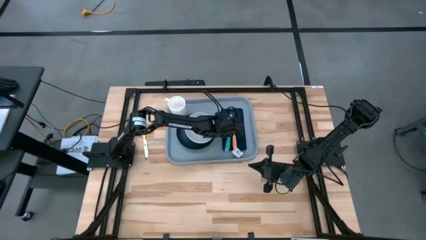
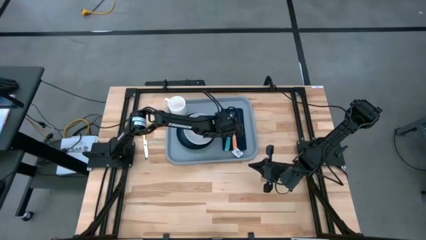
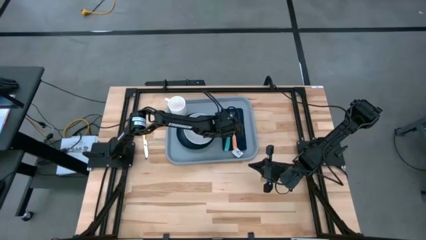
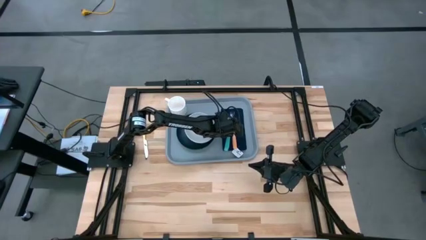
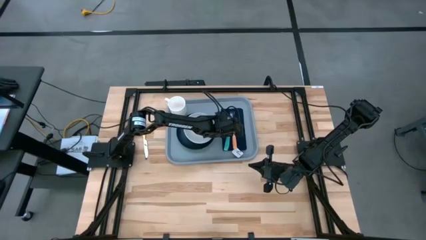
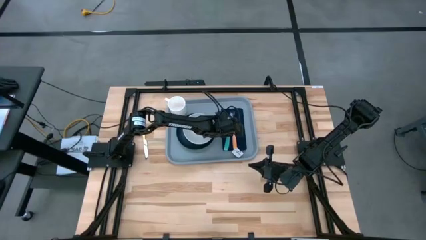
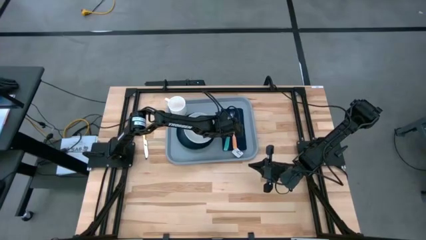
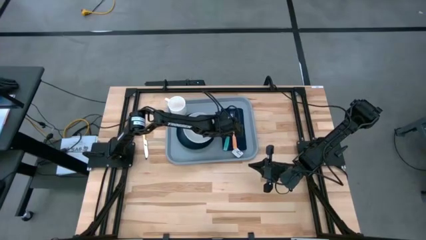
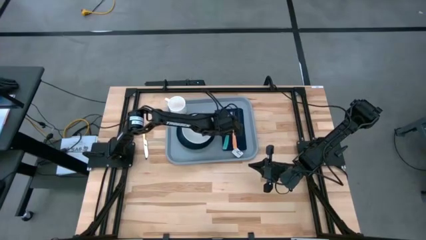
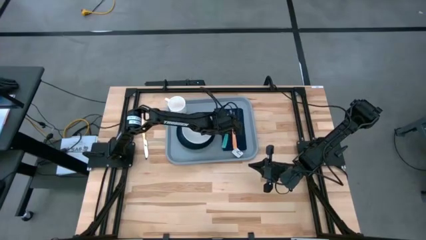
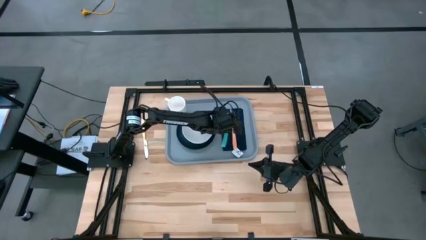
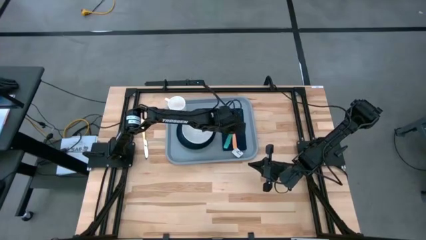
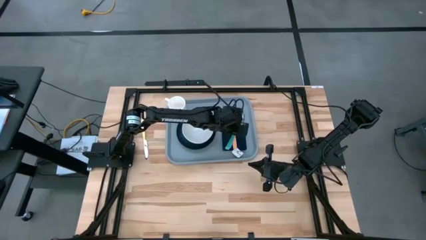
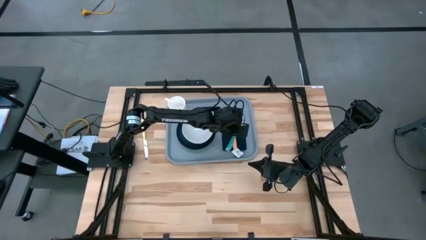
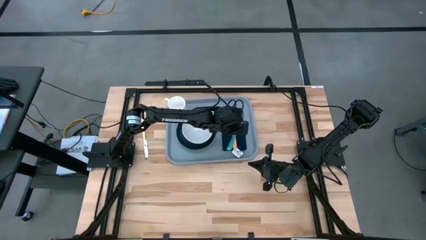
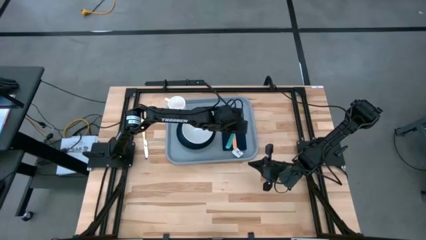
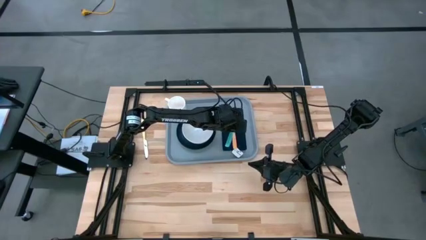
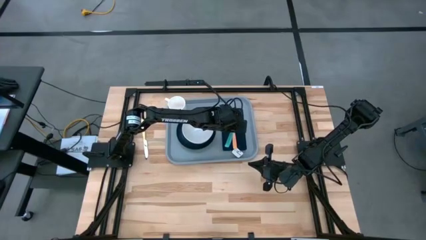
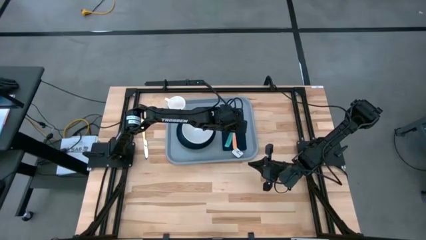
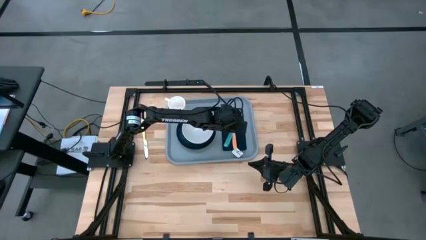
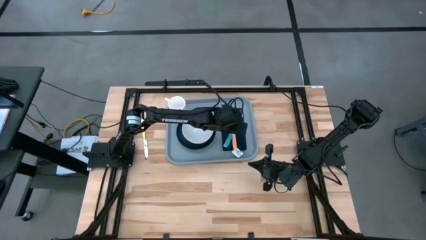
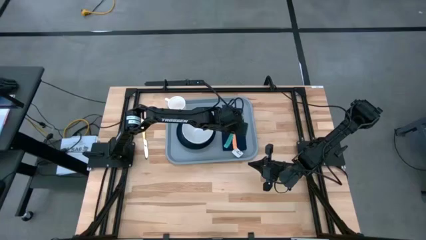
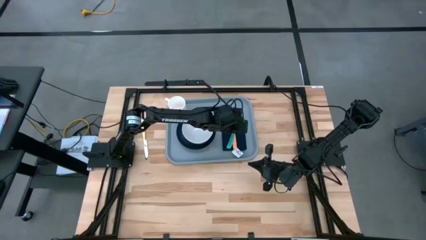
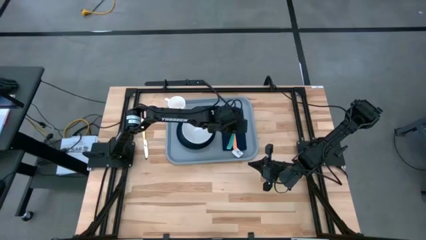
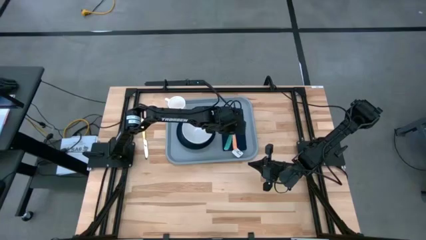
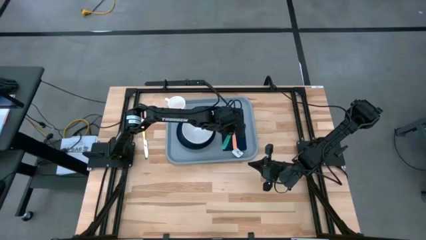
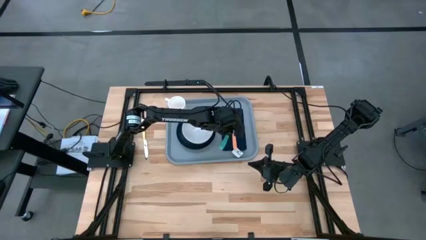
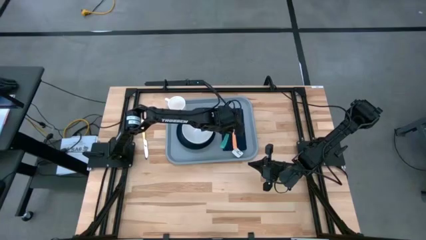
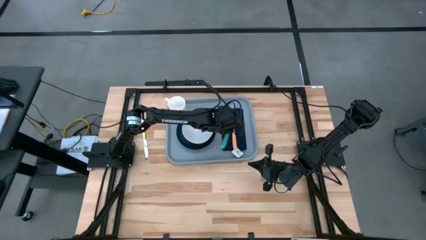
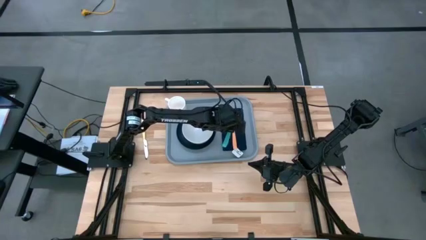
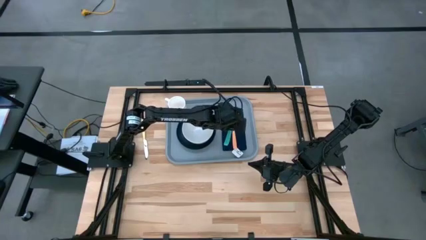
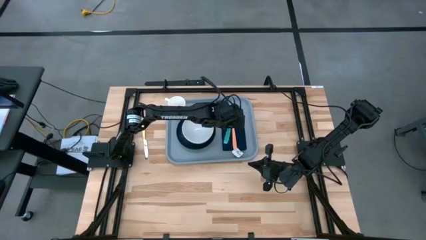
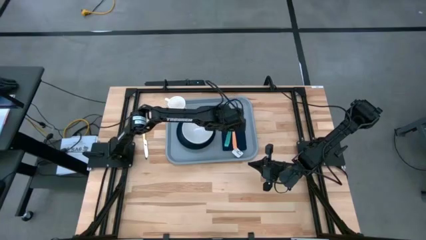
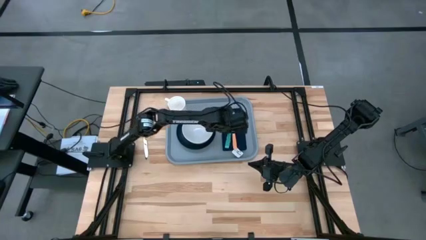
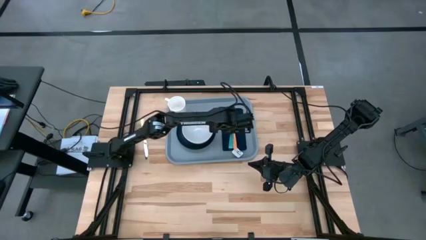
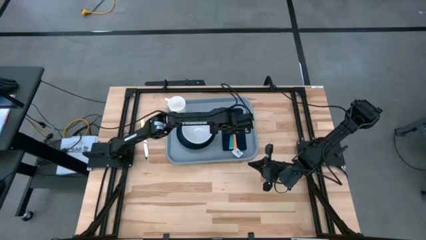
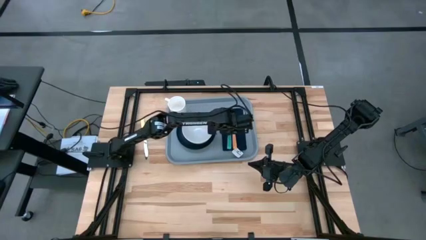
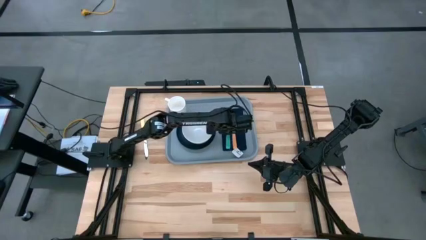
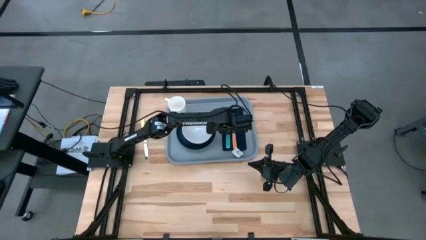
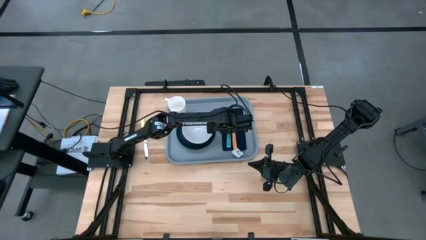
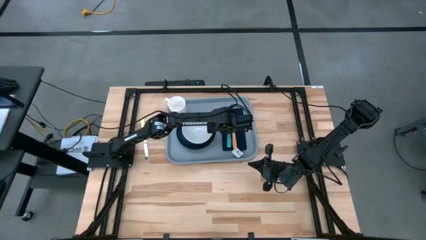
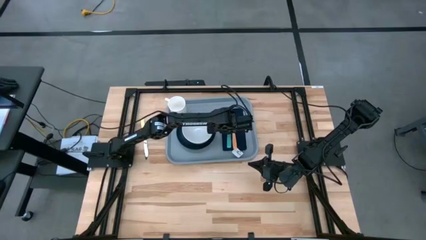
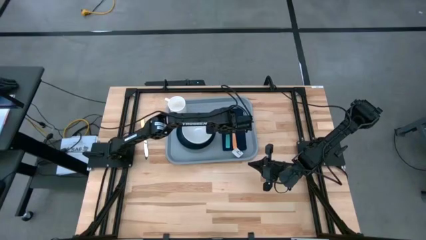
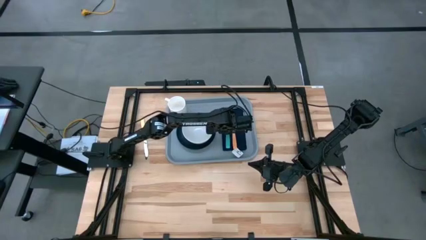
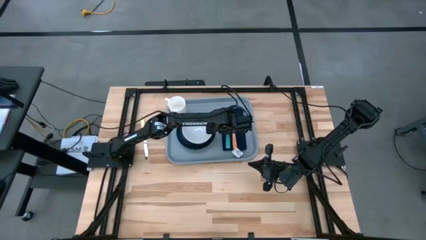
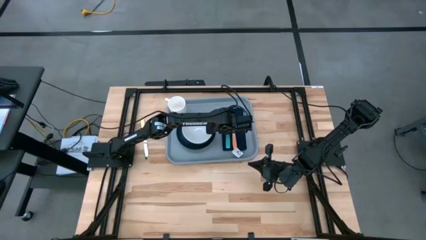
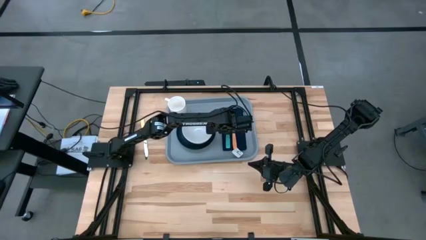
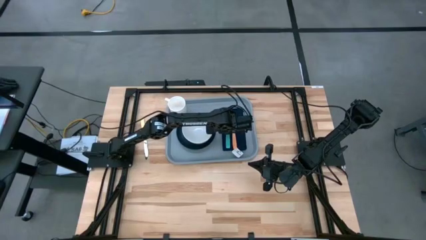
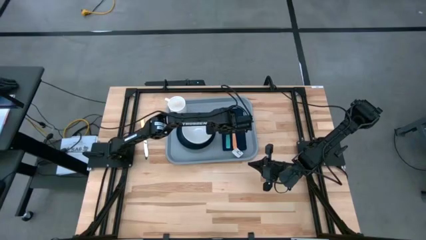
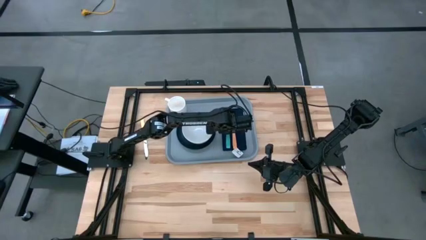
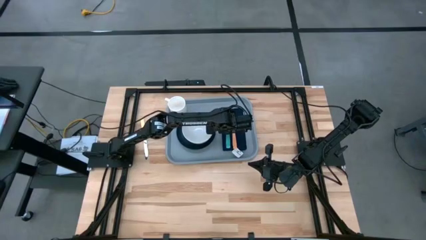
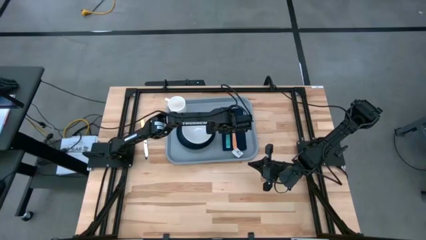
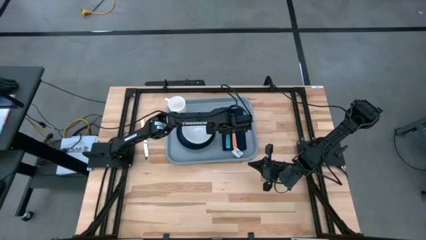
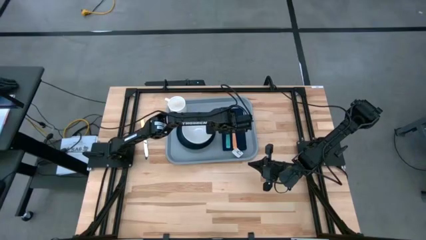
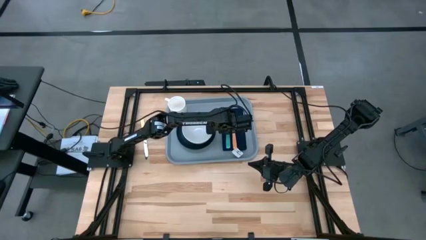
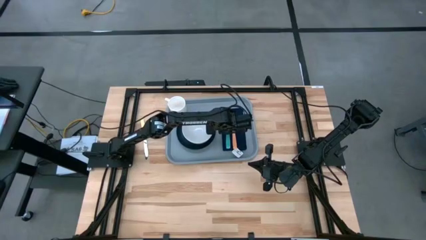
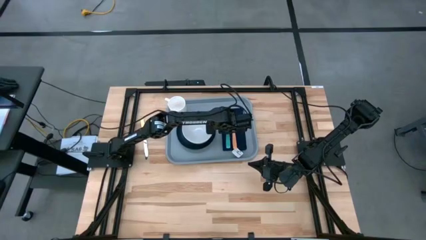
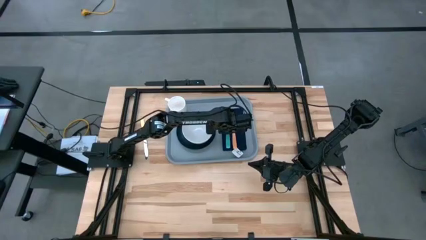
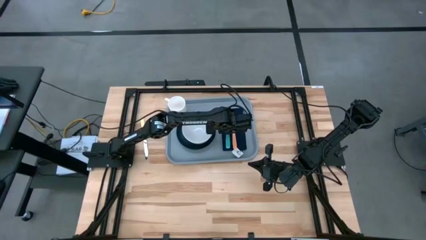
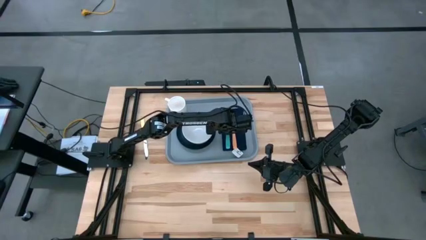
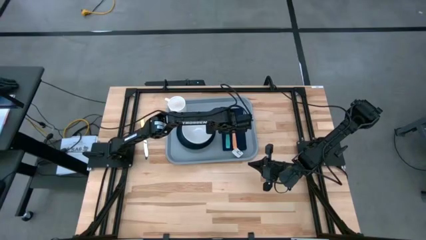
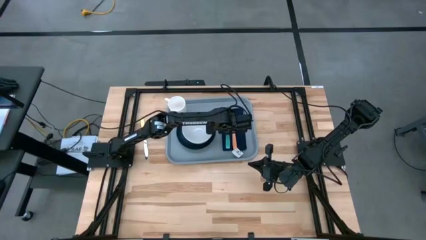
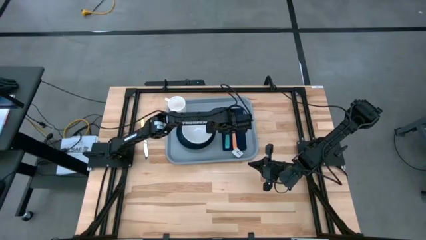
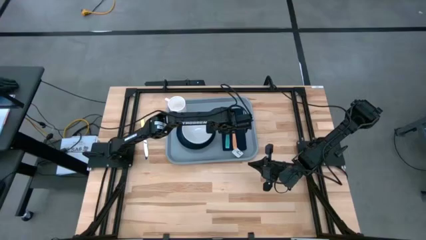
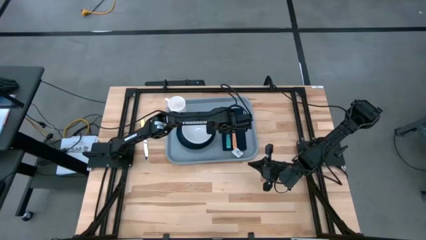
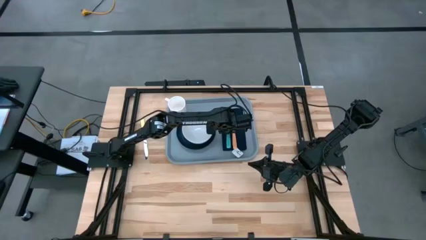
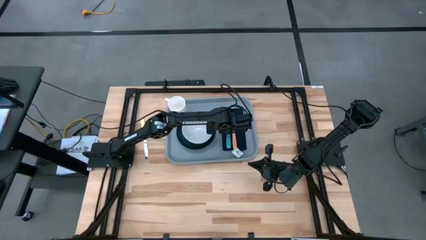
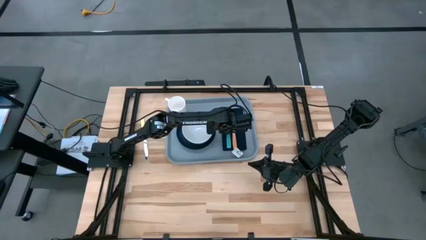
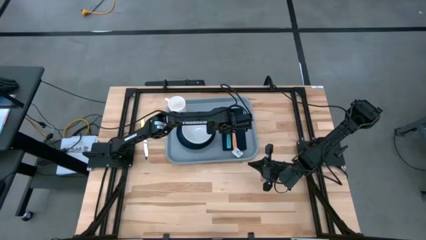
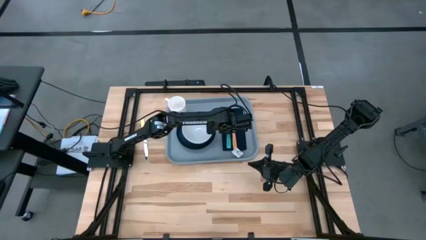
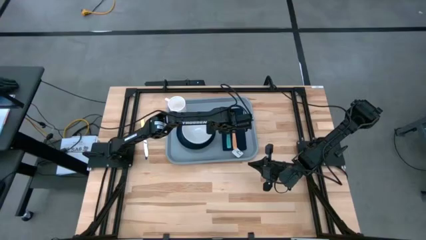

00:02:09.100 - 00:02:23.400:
Task: Set up tray
Put the green spoon on the black napkin to the left of the orange fork
